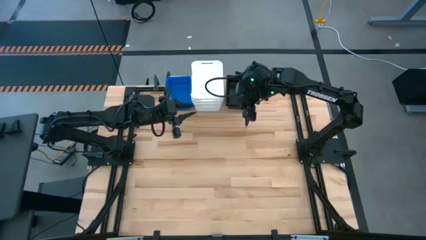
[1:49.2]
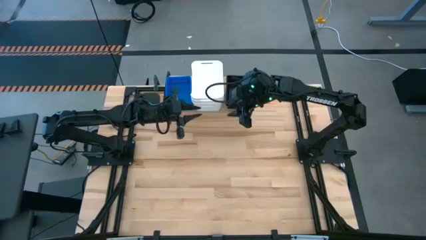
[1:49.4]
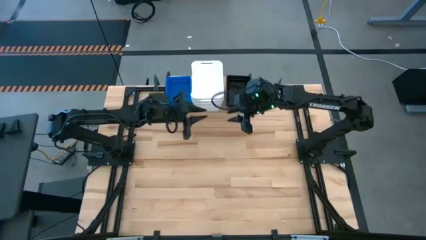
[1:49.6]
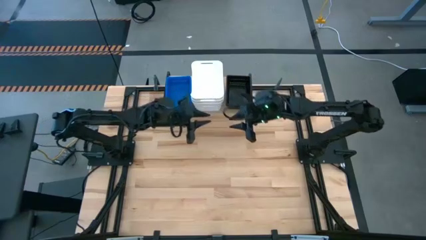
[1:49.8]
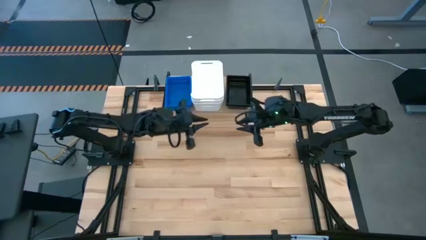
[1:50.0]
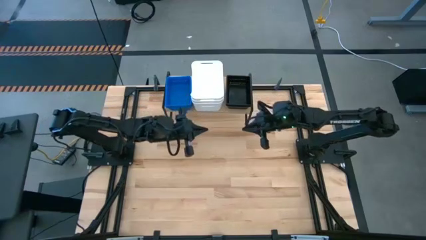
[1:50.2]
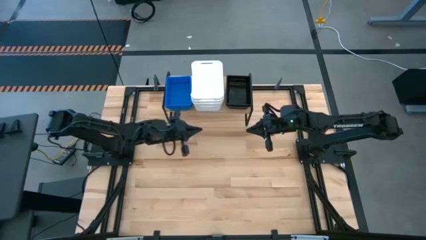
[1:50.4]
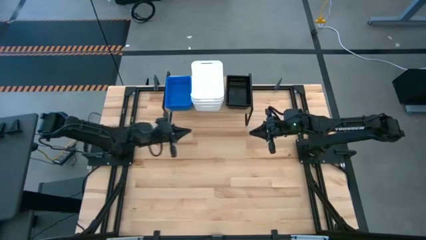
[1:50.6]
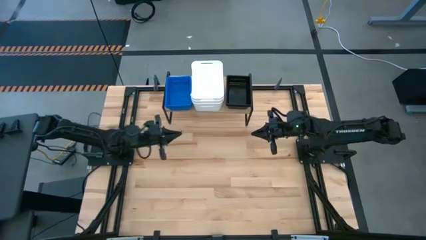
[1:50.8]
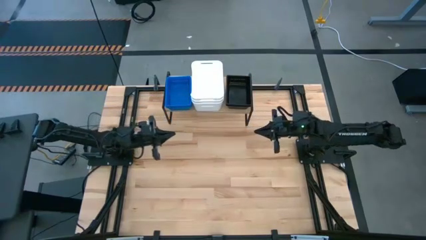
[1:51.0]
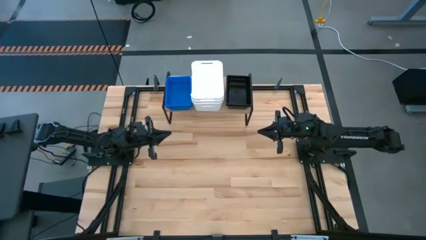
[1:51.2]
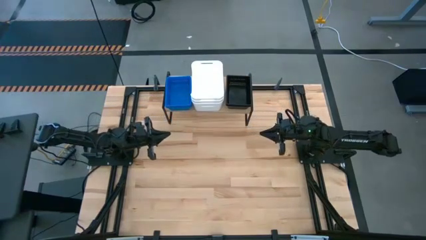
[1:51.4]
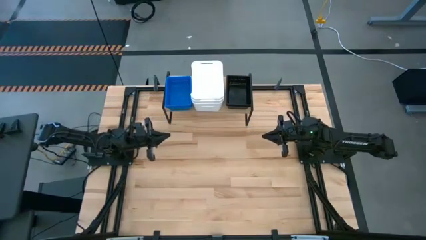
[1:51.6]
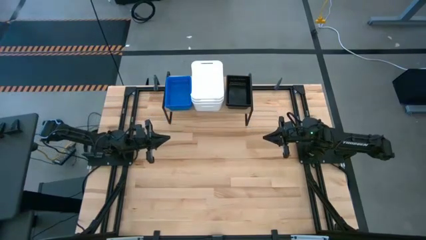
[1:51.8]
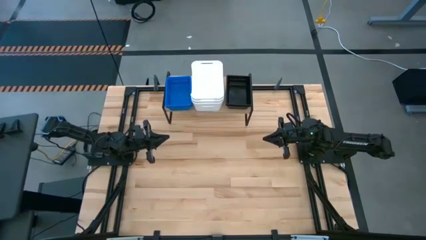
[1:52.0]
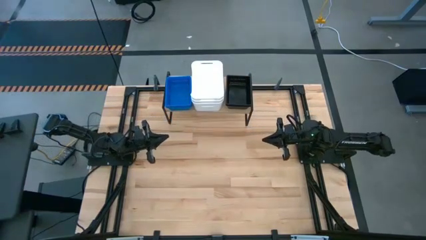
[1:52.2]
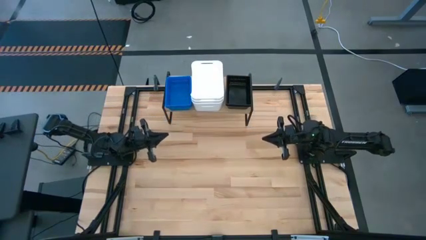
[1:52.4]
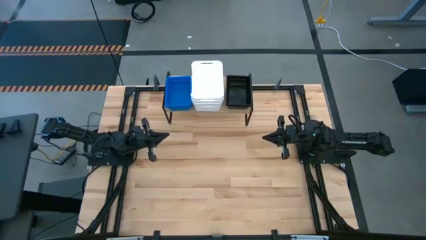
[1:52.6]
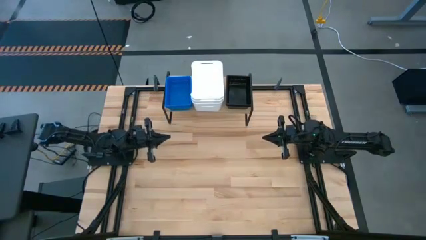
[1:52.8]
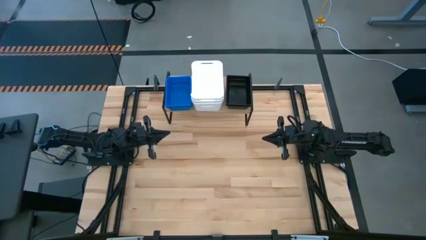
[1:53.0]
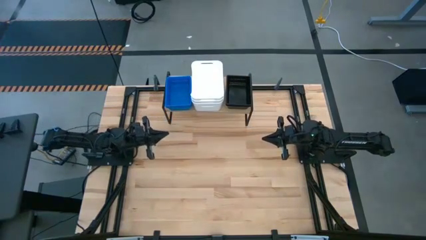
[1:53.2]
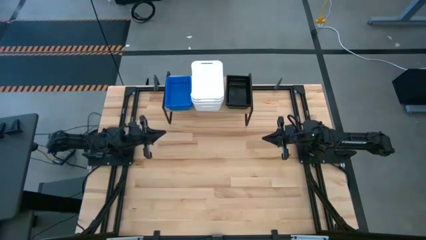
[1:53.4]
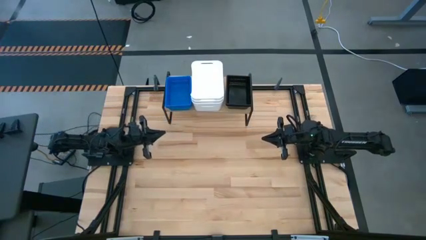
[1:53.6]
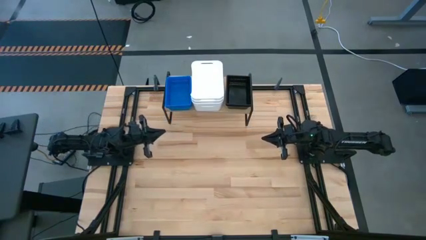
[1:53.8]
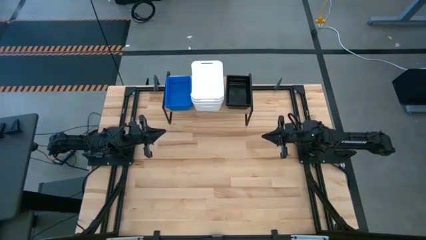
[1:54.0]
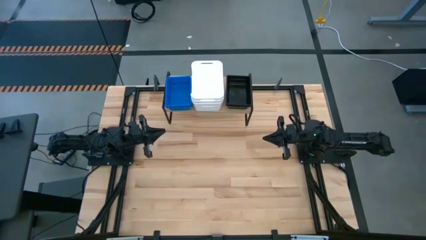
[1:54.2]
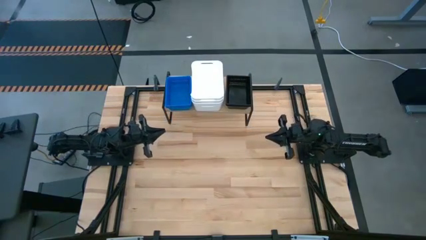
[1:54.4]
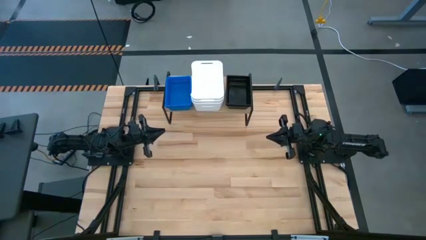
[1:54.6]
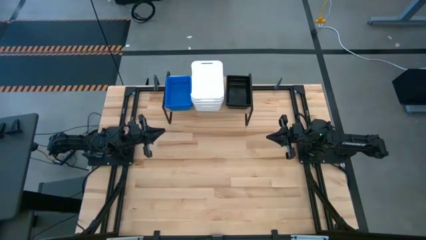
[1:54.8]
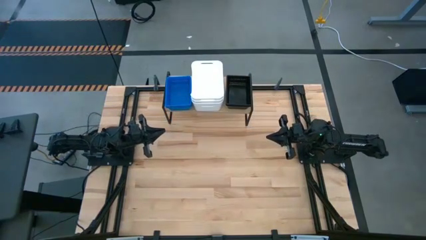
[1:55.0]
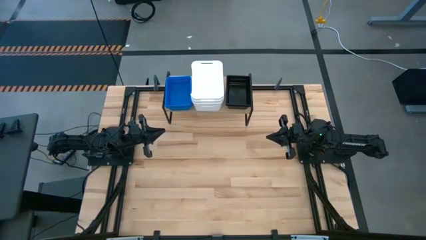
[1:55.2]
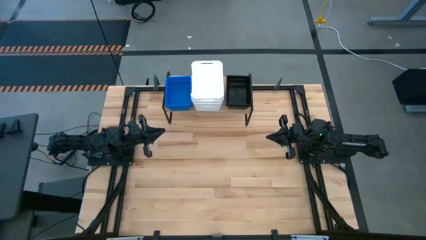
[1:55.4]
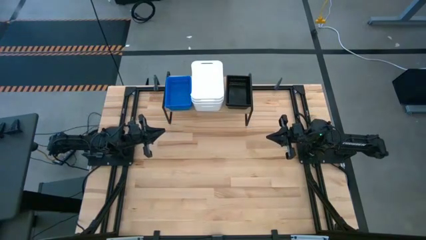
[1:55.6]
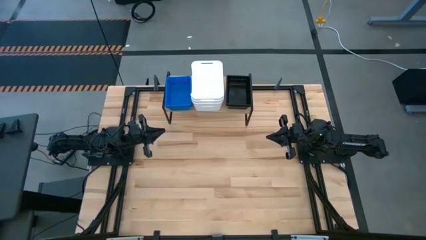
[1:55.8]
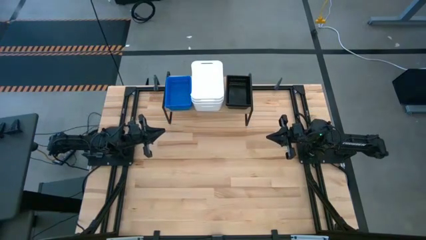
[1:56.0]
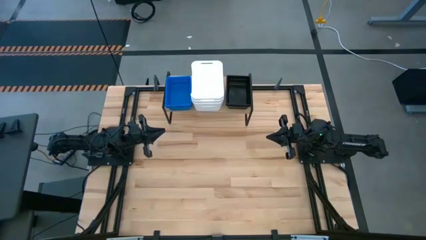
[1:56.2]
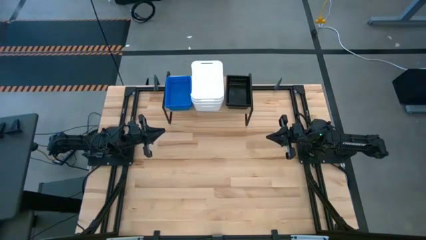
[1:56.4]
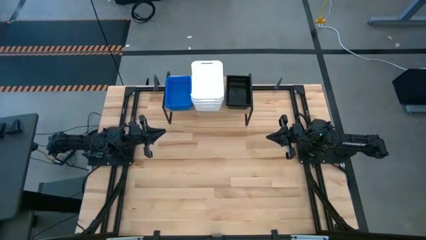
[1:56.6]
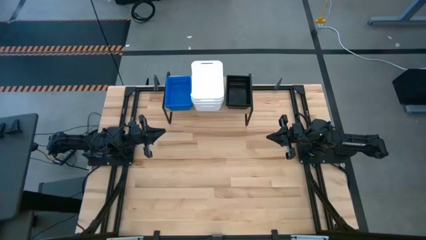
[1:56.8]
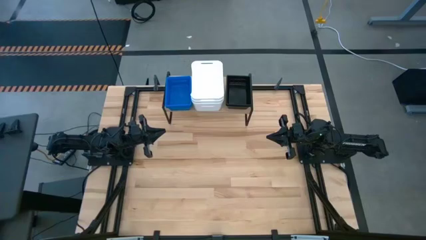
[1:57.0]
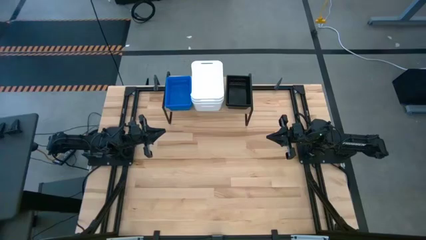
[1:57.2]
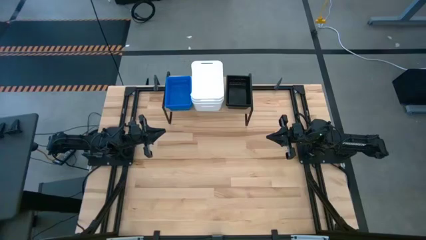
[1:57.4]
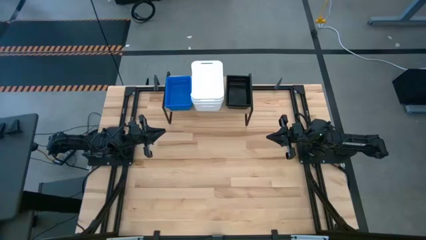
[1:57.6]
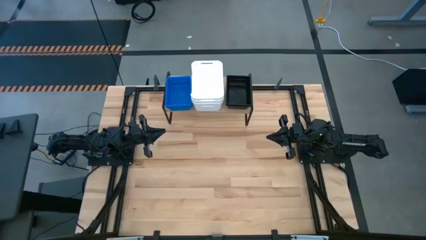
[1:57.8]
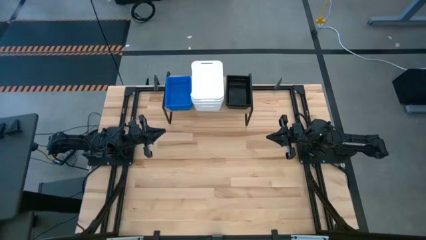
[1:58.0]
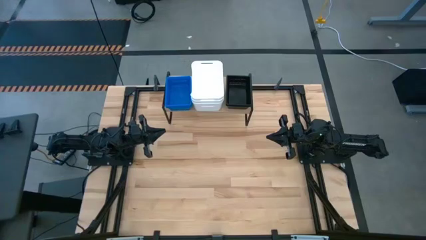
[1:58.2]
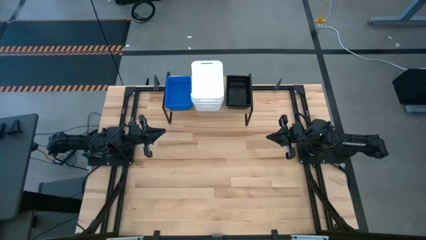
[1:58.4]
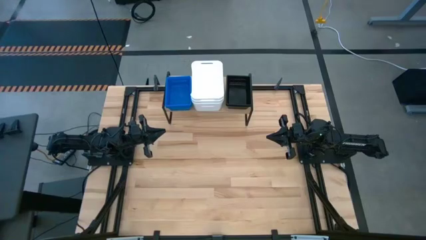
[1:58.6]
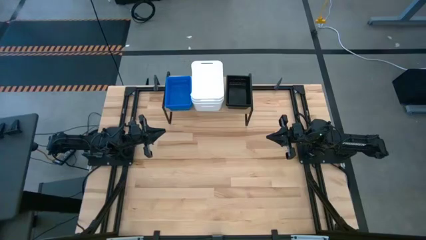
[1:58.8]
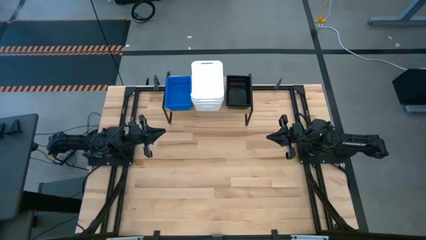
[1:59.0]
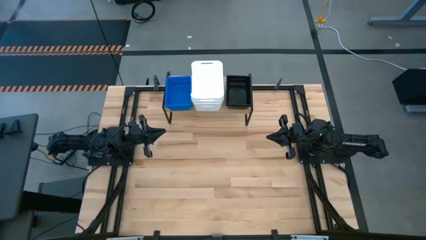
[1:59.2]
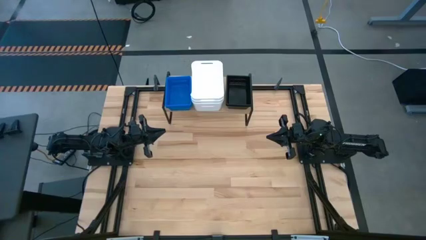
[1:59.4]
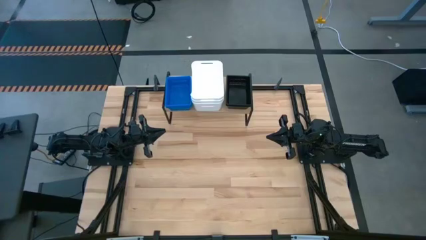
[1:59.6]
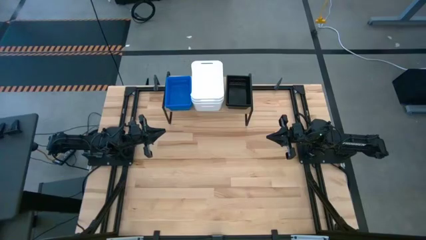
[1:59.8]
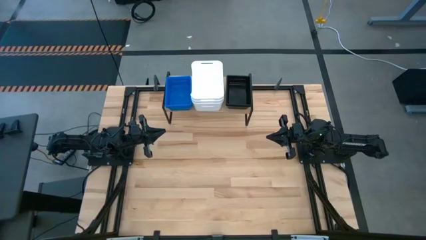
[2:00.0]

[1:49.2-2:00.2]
Task: Stack baskets on shelf by color
Return to Home Position

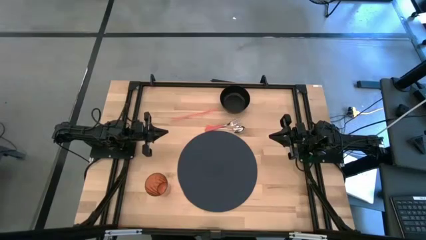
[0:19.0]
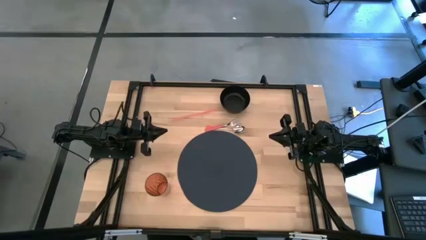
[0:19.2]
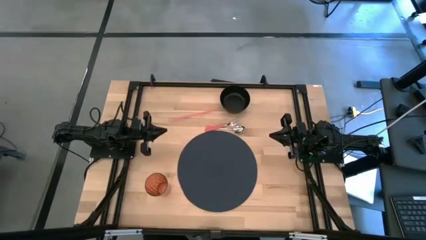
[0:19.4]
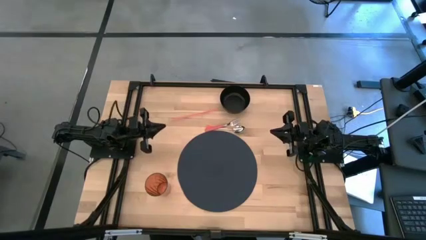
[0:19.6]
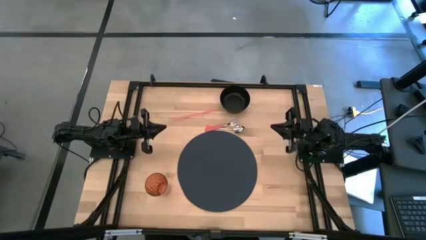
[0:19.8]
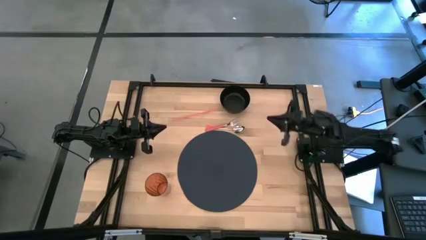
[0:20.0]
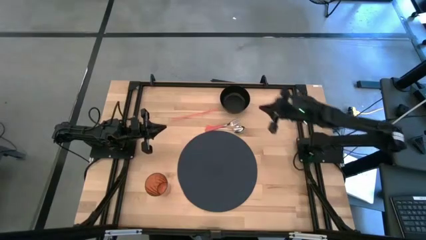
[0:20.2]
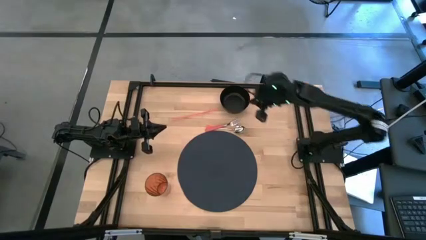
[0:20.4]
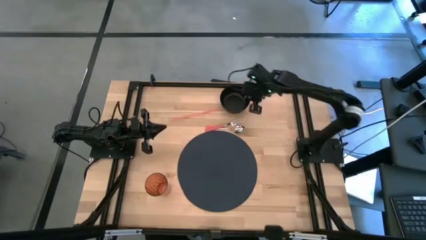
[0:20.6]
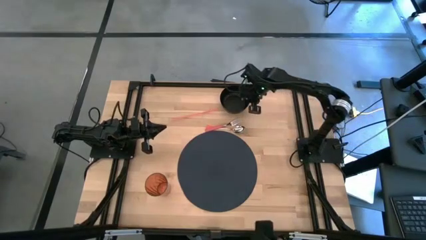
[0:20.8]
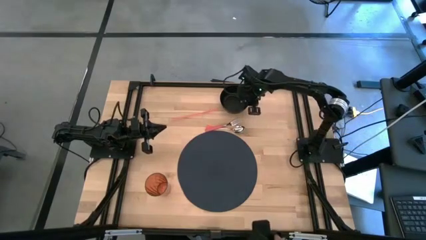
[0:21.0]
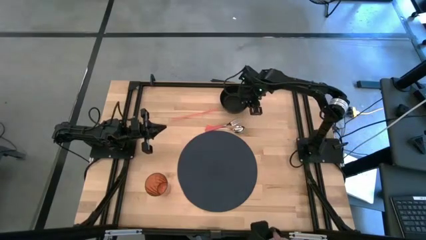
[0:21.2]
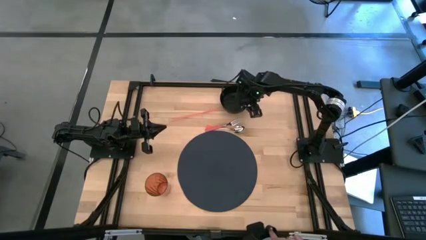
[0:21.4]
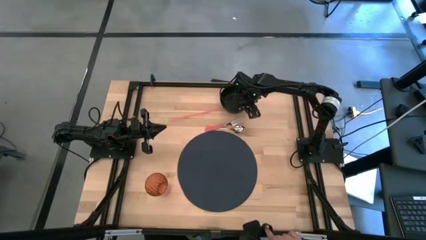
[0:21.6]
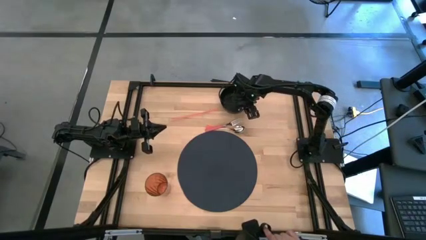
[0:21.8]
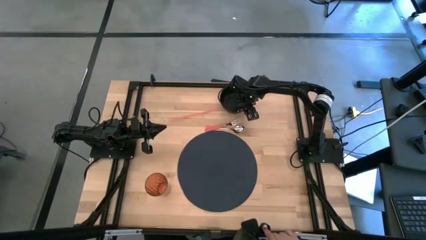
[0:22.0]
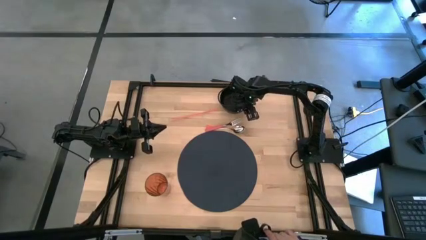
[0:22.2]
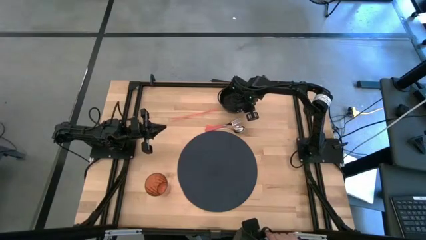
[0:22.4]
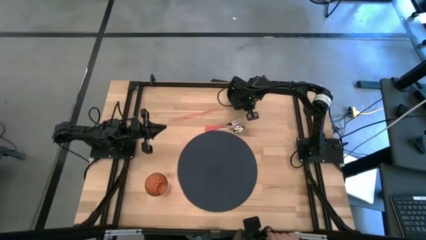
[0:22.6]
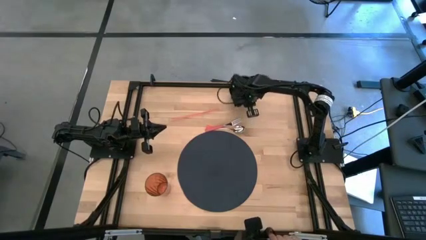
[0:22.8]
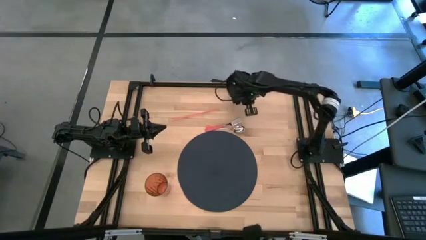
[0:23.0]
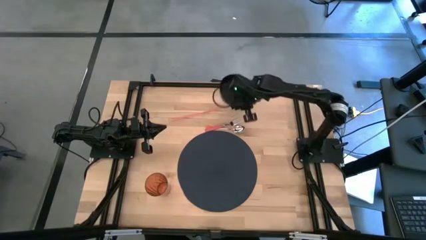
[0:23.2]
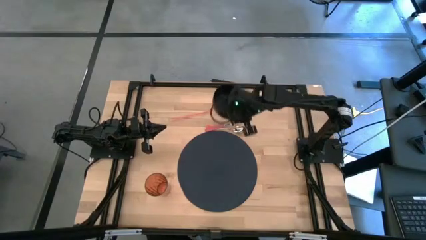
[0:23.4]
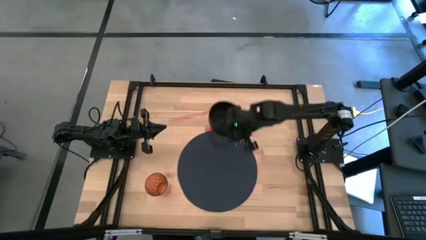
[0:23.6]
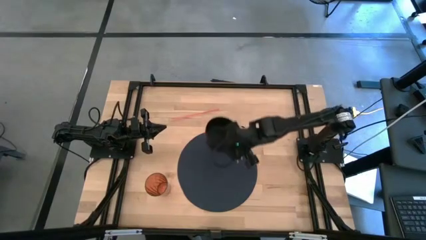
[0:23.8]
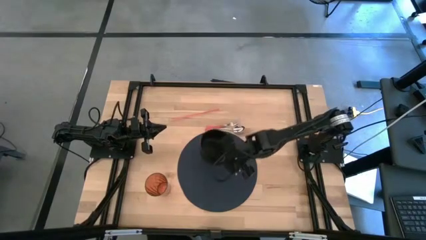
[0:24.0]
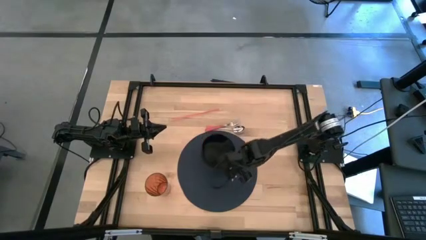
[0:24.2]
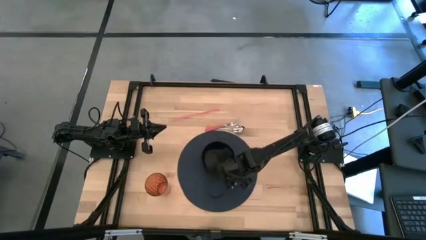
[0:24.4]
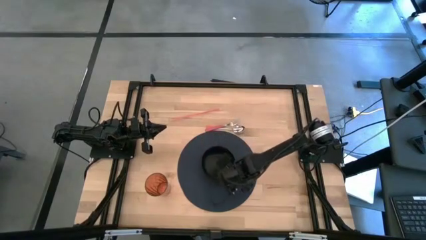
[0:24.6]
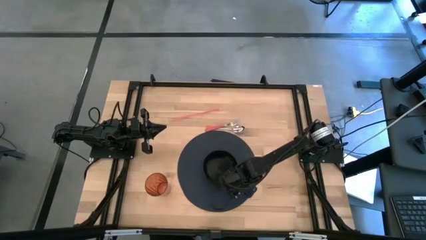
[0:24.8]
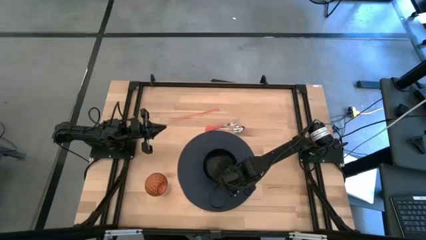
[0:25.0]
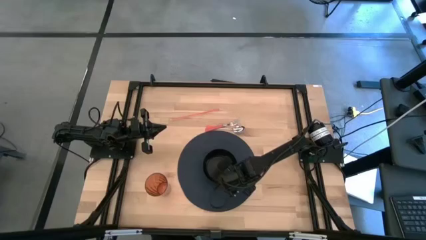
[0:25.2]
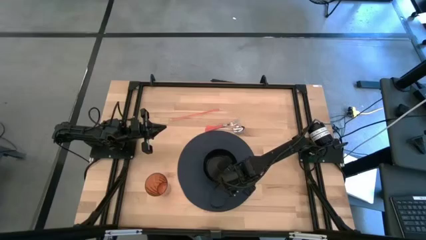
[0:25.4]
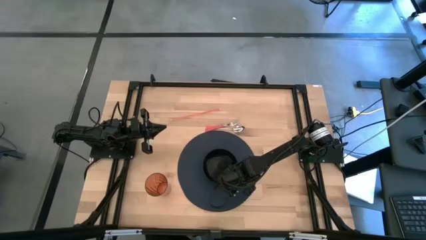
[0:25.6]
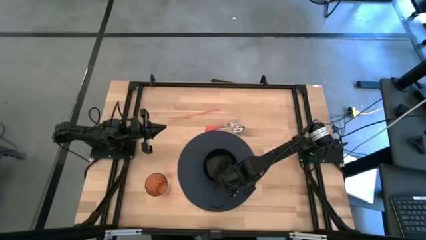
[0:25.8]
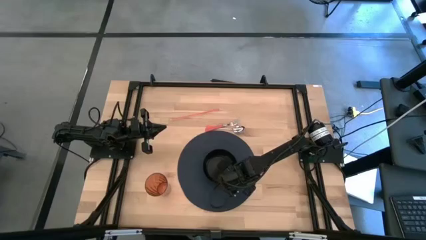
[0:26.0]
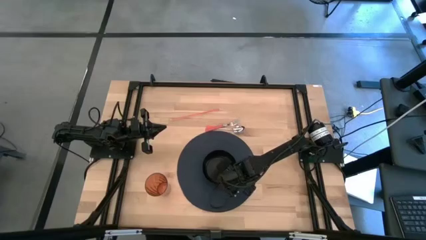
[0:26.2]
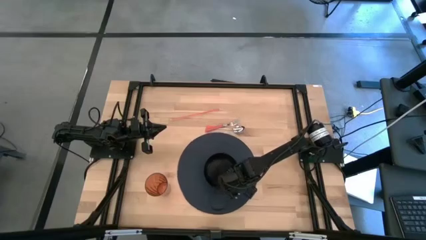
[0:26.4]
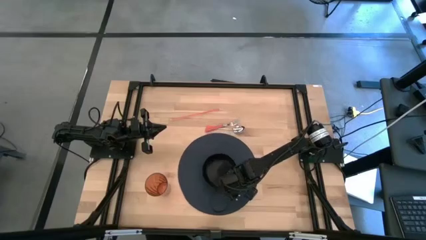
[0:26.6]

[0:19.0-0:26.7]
Task: Pick & Place Utensil
Put the black bowl on the center of the blue mat
